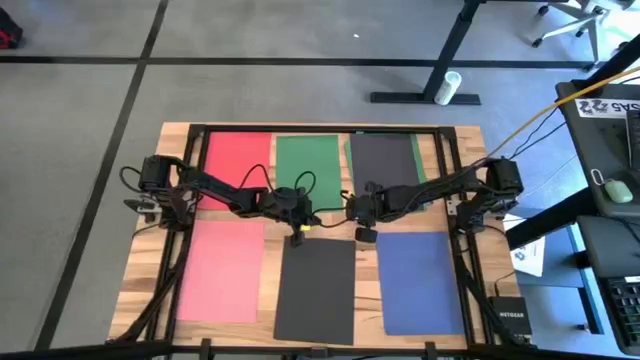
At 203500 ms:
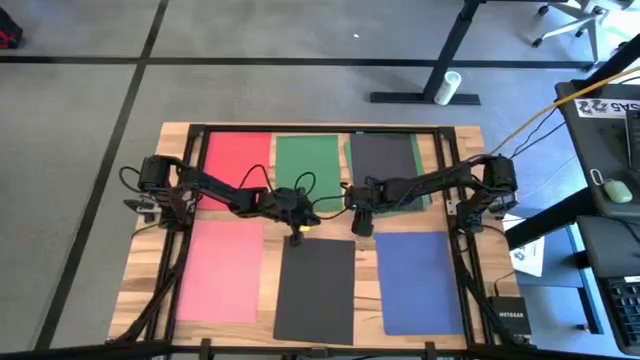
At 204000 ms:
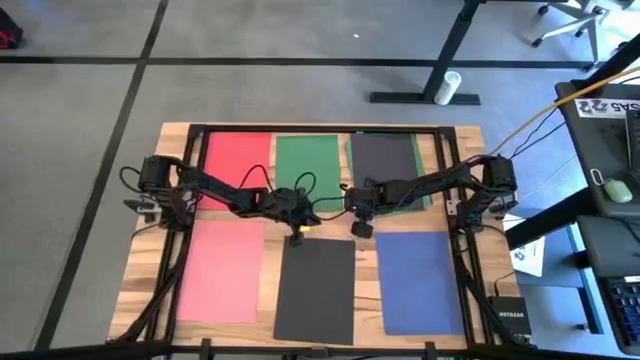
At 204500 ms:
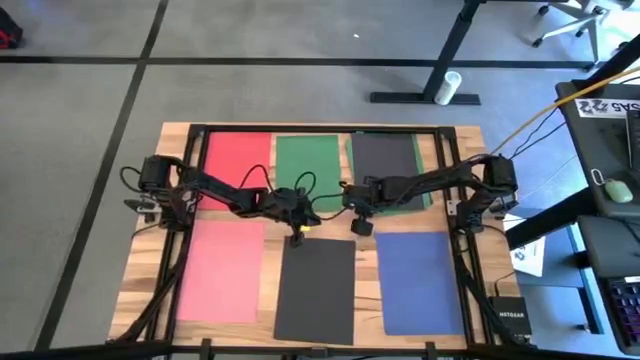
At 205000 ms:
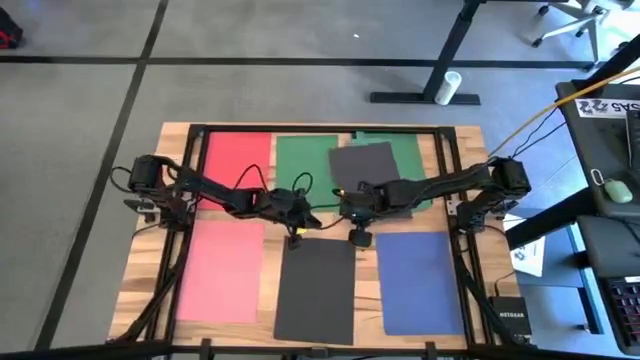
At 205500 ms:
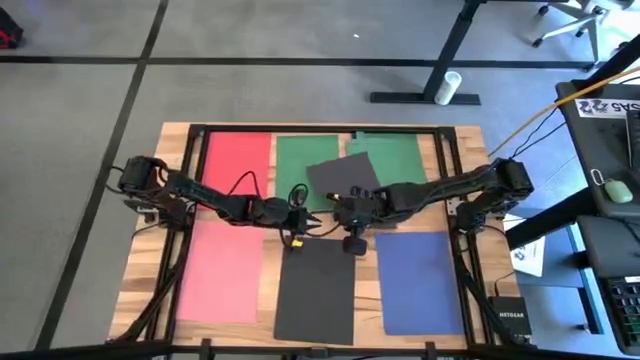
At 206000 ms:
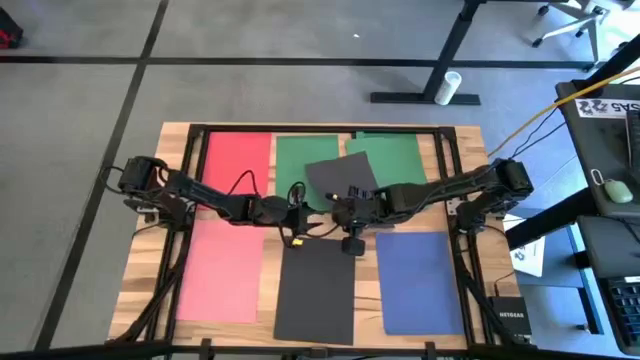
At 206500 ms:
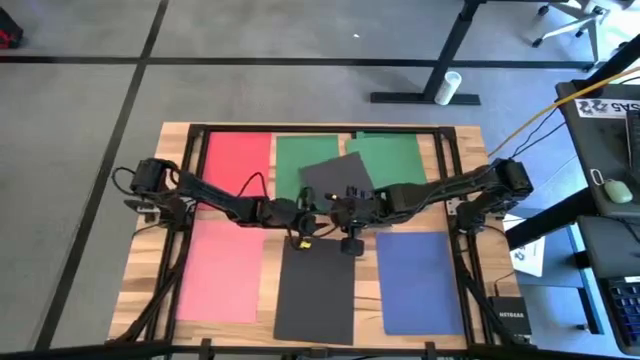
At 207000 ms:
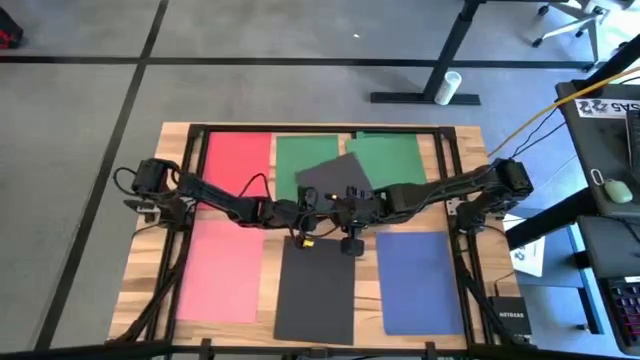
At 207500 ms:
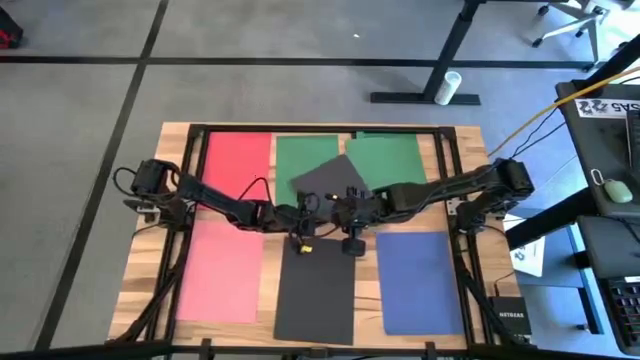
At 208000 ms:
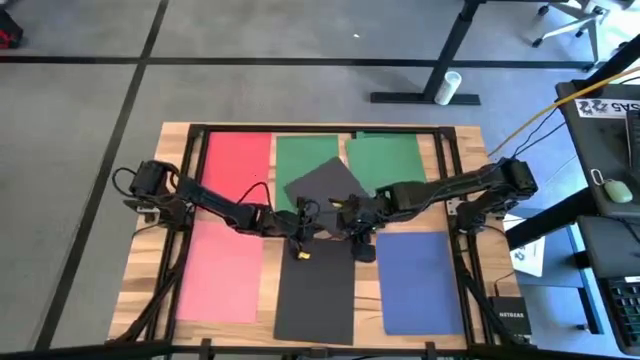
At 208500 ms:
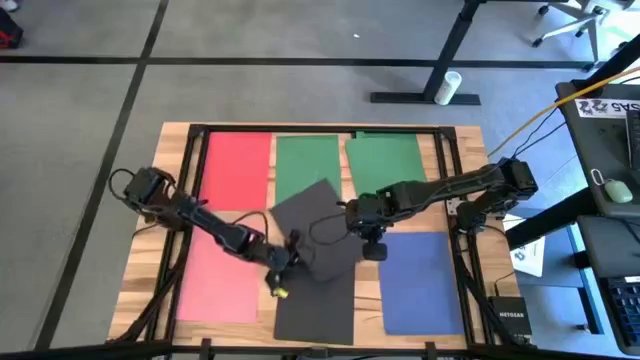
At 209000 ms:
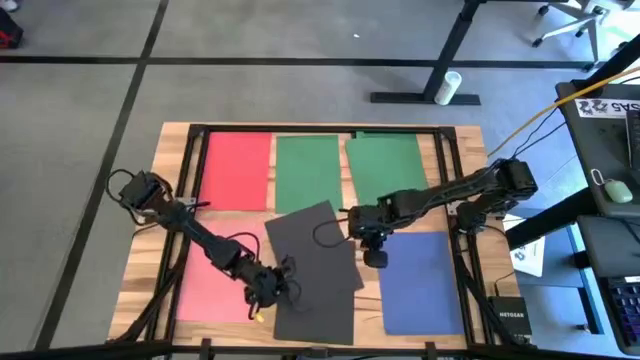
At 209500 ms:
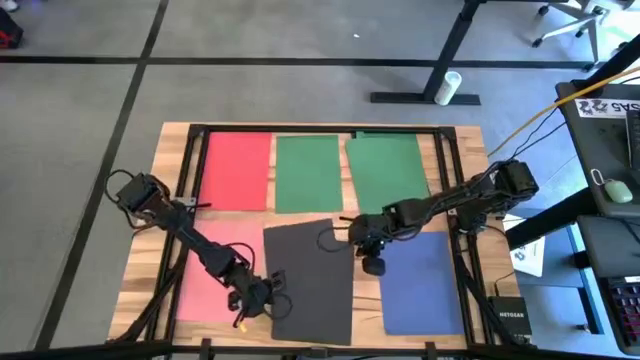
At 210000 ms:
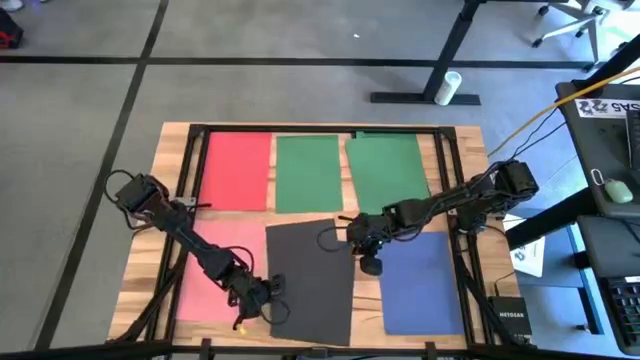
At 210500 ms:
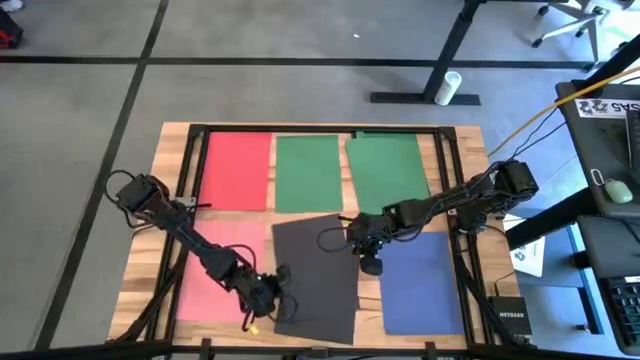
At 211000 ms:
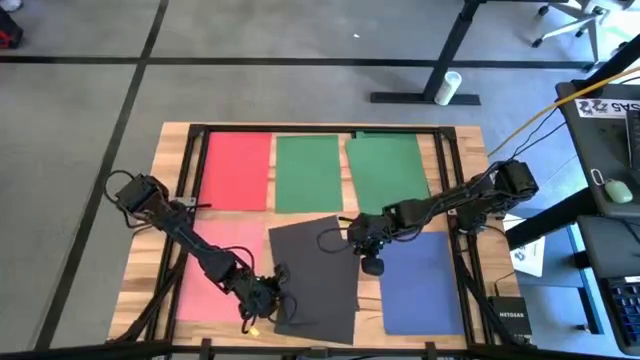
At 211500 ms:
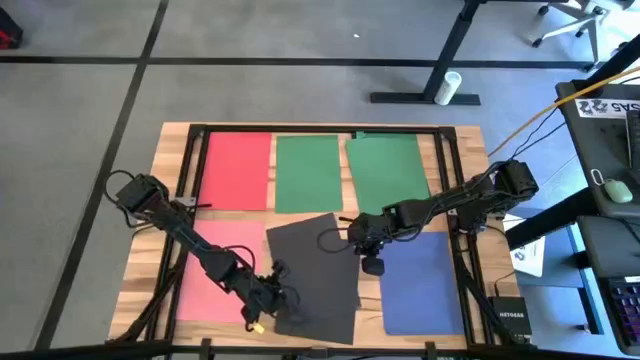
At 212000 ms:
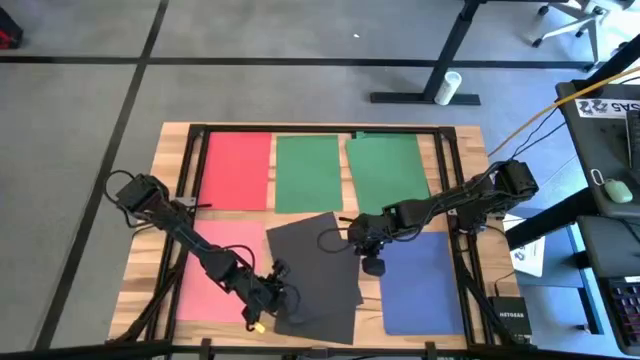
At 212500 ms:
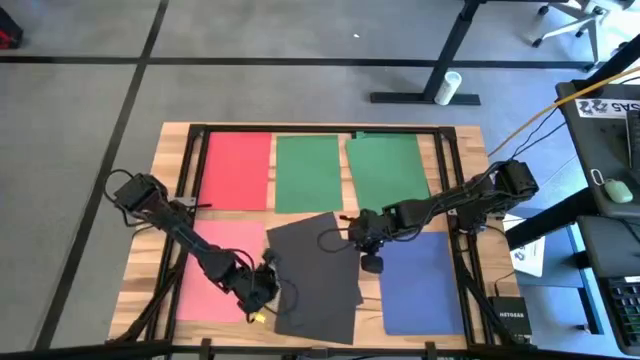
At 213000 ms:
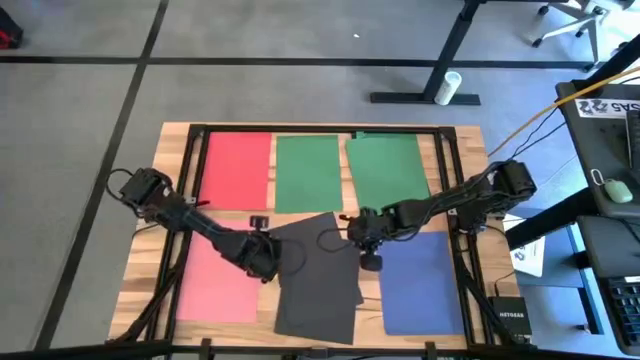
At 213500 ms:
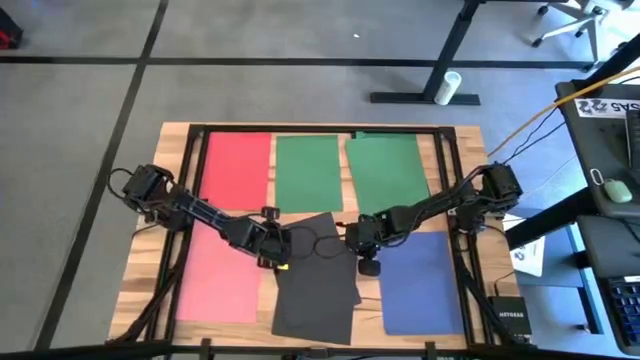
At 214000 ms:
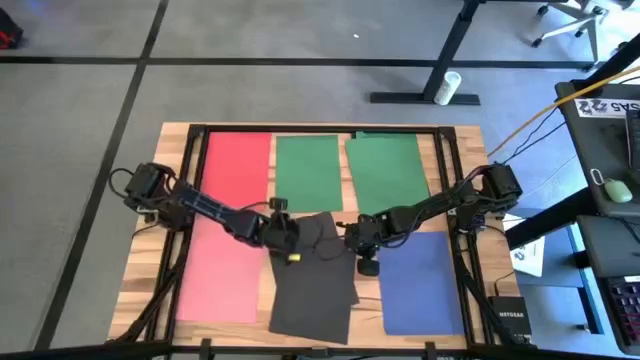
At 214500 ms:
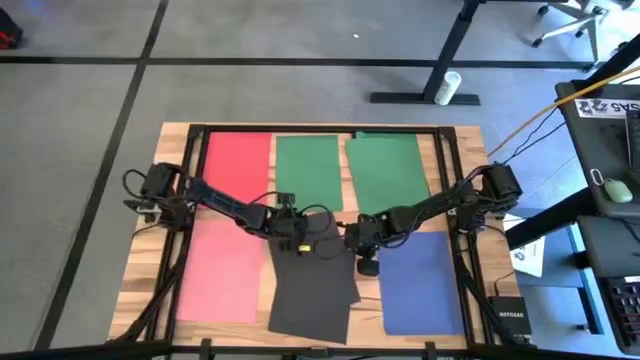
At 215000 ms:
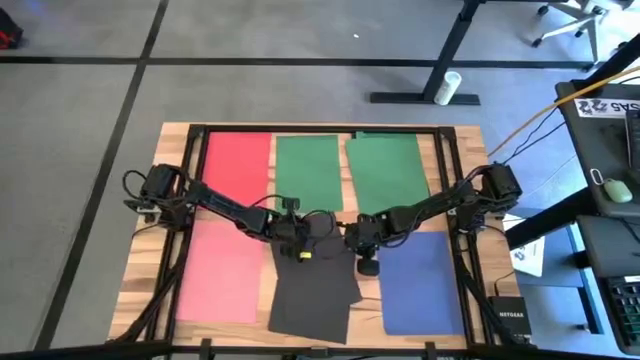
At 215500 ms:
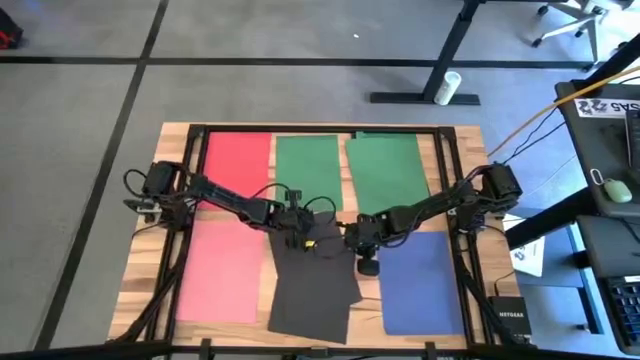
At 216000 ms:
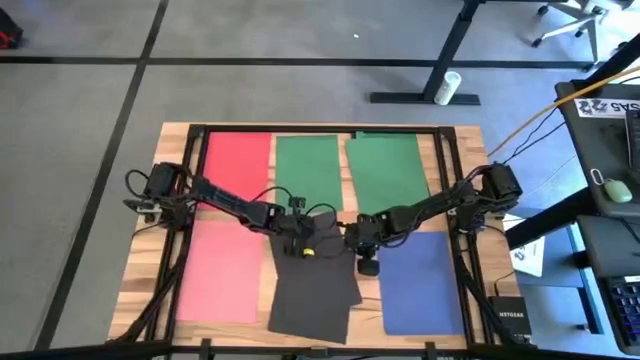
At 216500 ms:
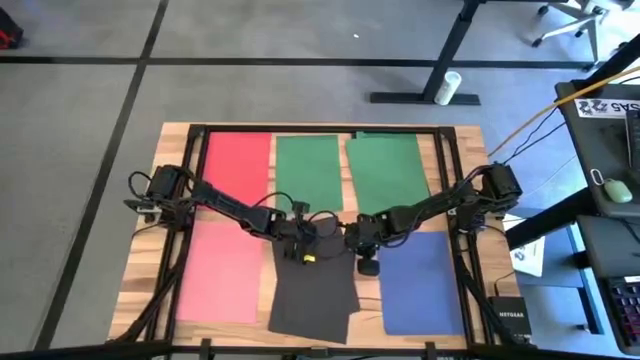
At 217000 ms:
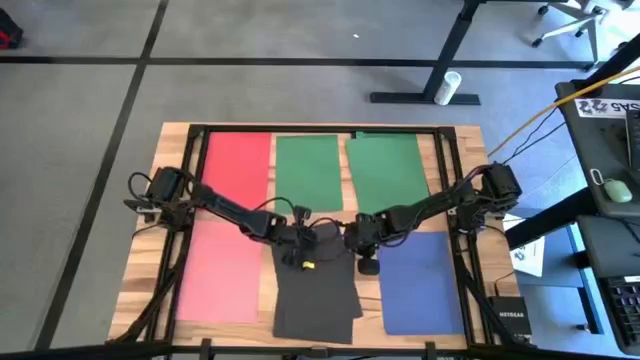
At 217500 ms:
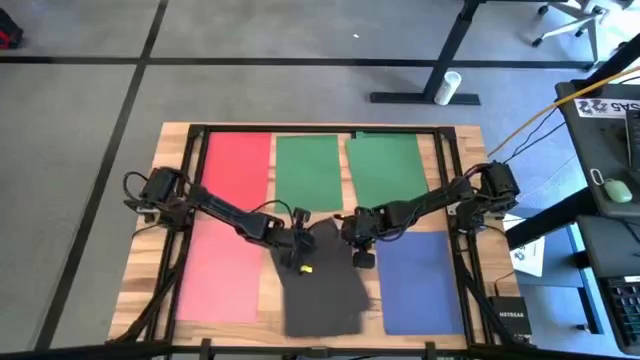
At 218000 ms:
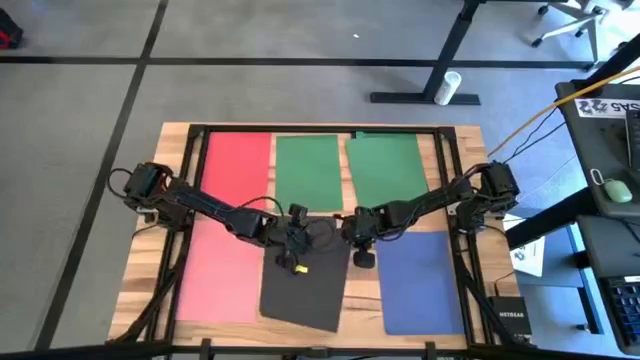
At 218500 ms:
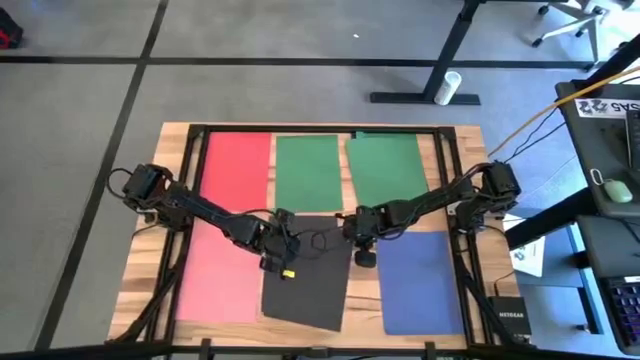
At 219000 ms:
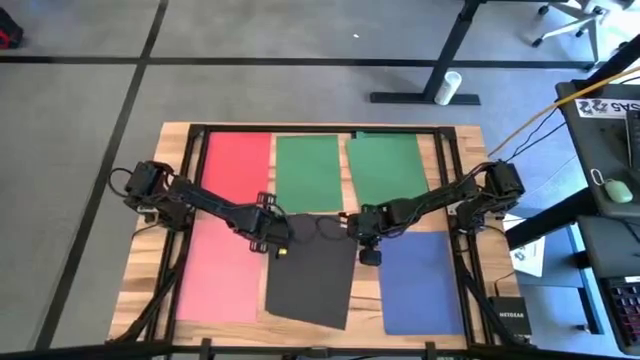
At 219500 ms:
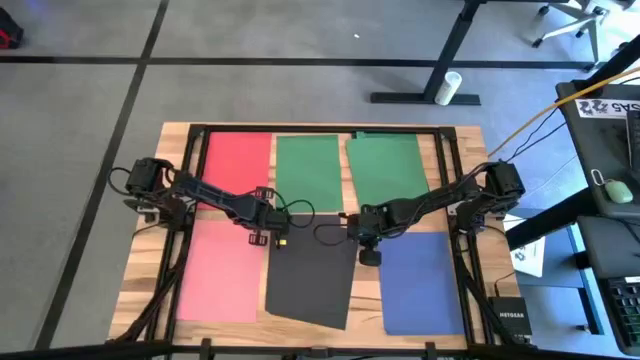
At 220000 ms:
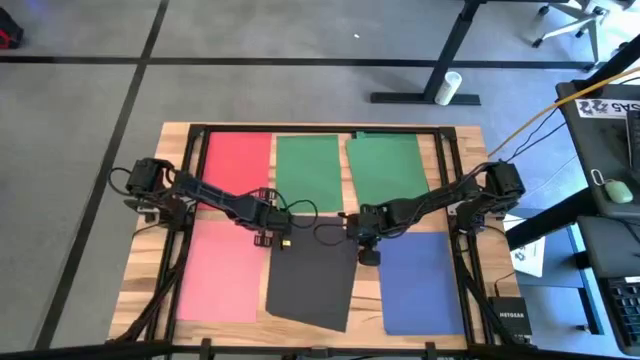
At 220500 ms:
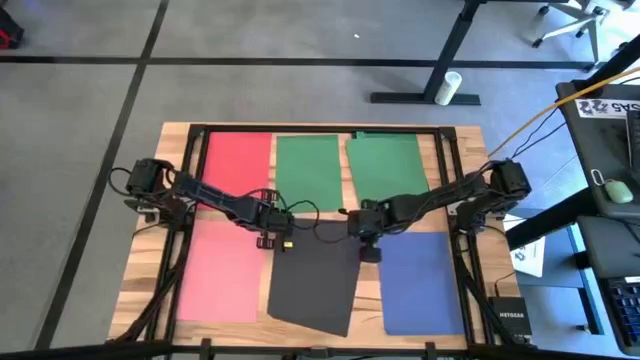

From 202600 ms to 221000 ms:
Task: Organize paper
Stack the black paper on top of the black paper

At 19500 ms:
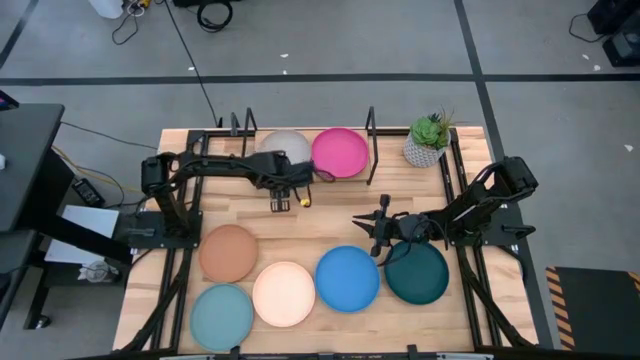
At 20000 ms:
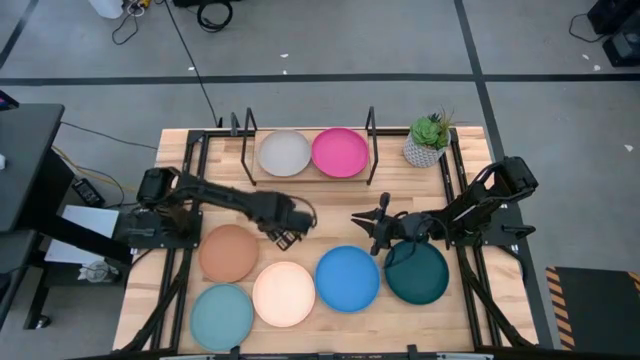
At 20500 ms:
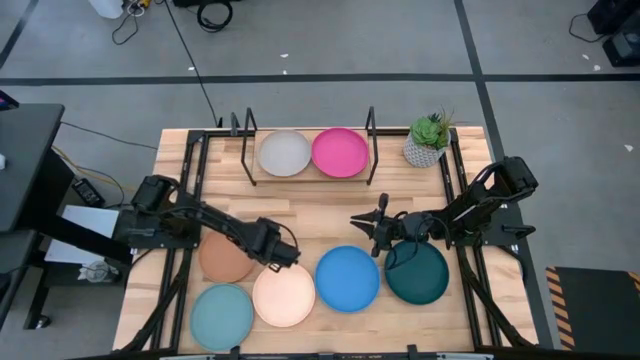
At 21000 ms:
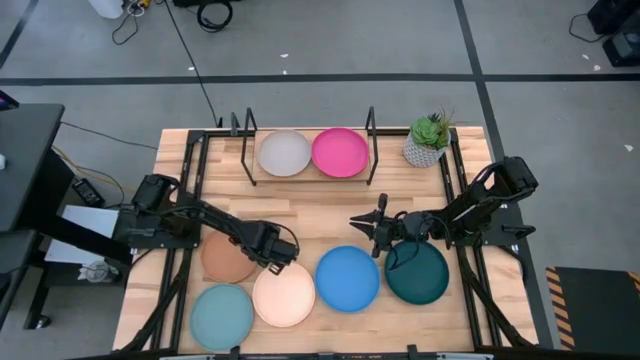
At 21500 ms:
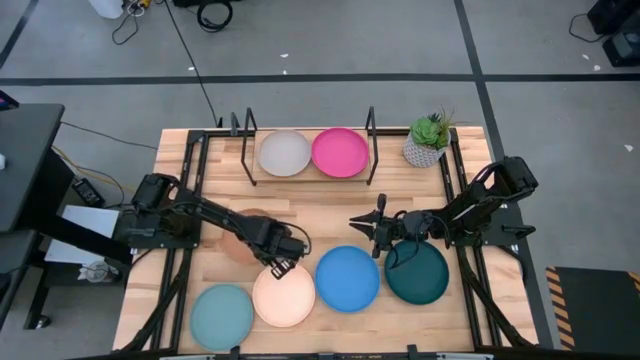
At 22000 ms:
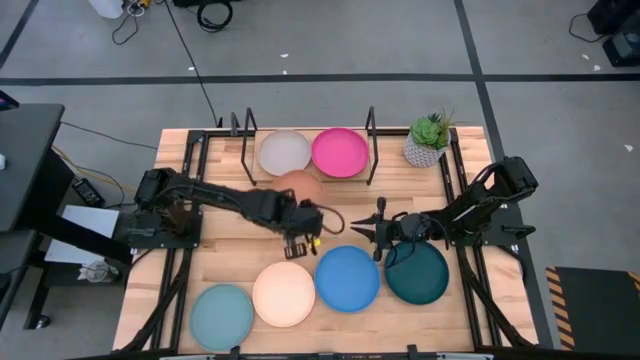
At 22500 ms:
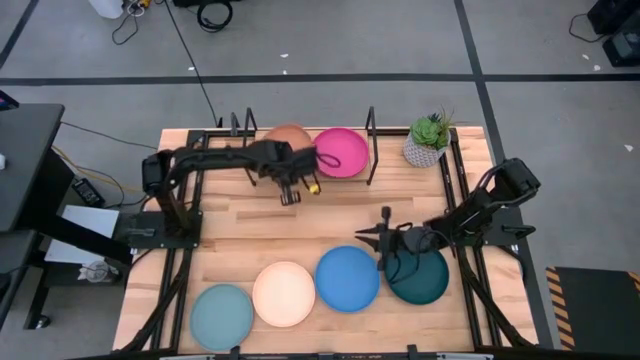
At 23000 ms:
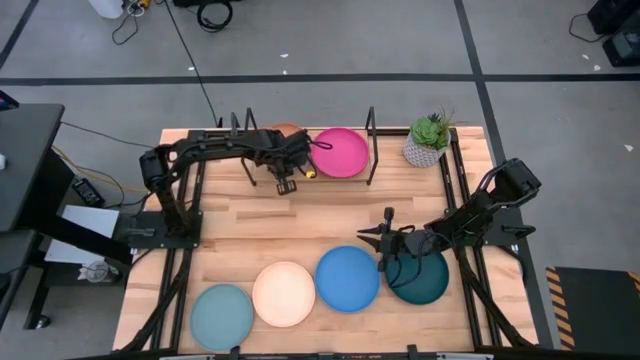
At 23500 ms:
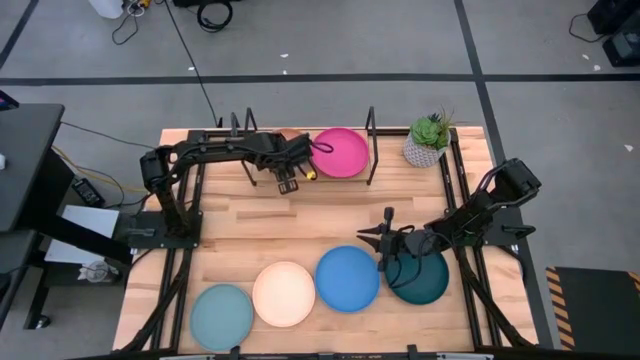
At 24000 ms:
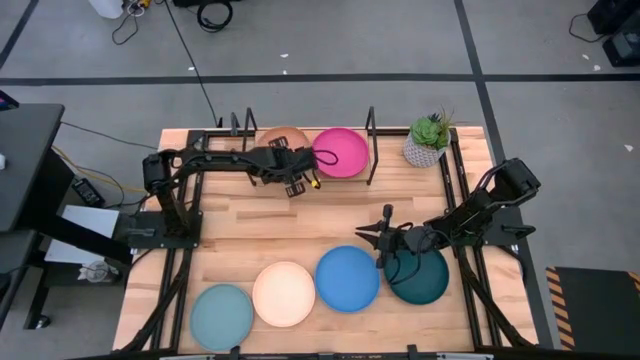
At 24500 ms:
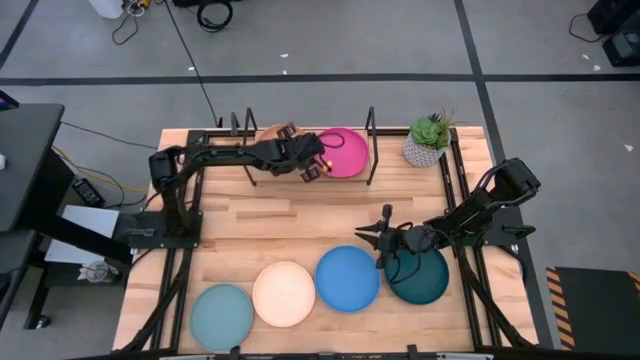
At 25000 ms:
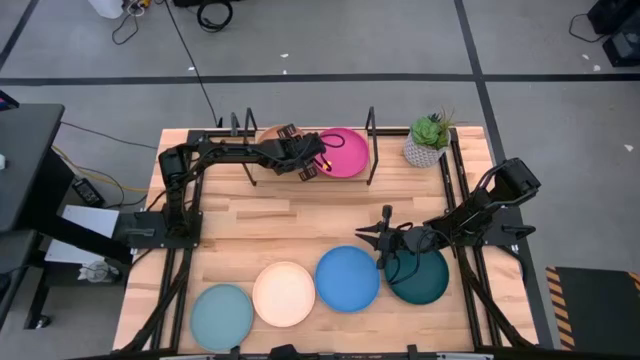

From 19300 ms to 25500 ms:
Task: Place and stack plates onto a shelf
Stack the light brown plate on top of the grey plate
